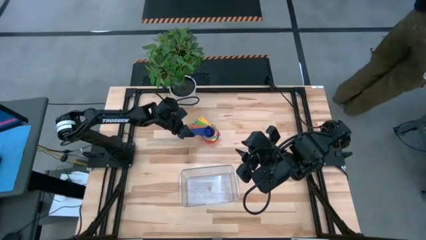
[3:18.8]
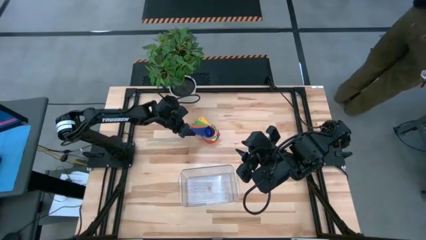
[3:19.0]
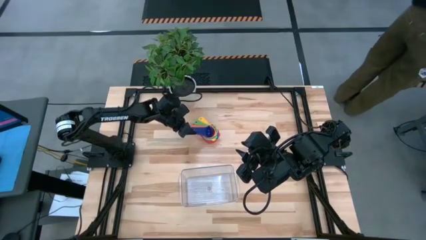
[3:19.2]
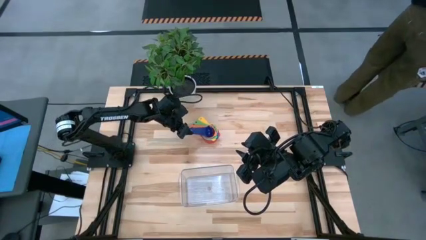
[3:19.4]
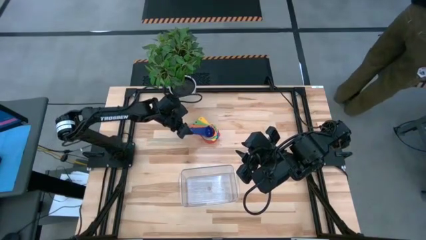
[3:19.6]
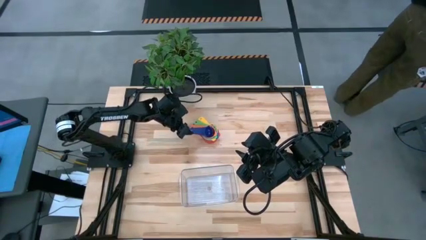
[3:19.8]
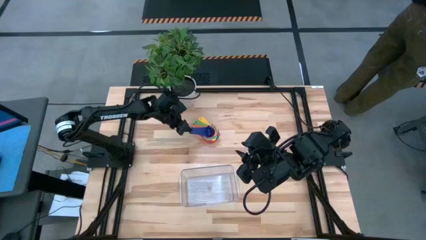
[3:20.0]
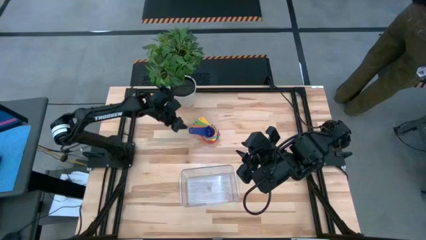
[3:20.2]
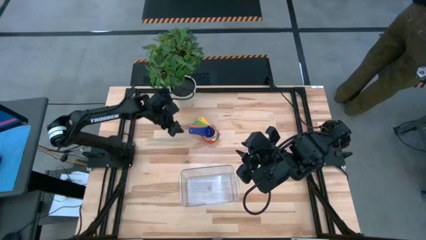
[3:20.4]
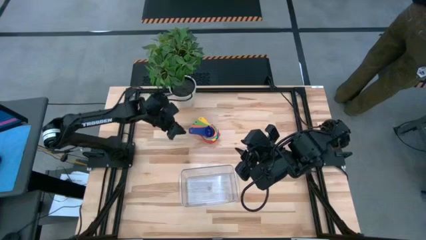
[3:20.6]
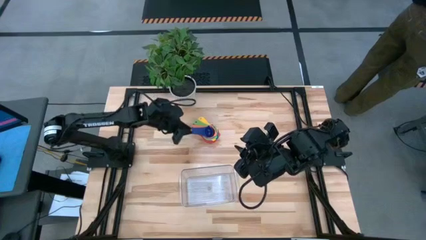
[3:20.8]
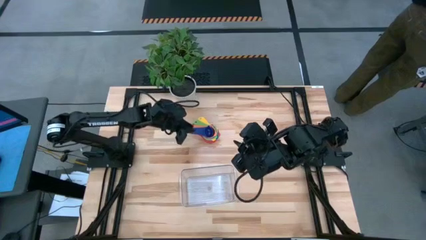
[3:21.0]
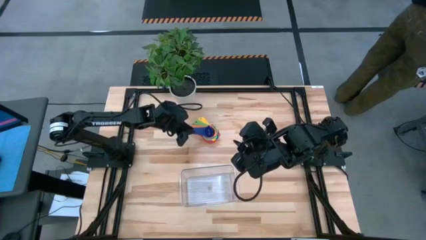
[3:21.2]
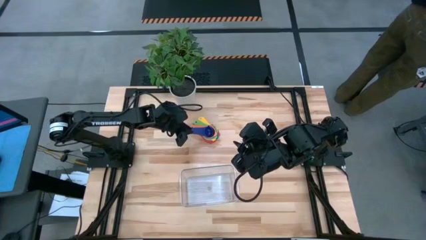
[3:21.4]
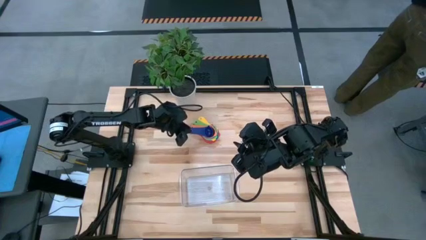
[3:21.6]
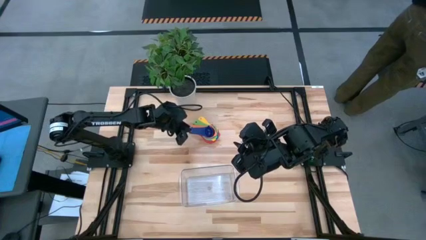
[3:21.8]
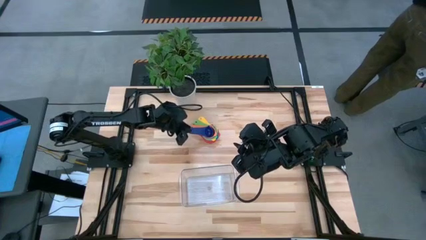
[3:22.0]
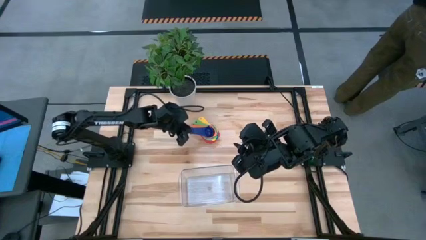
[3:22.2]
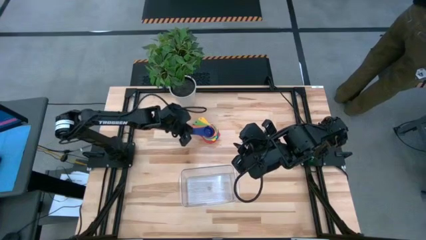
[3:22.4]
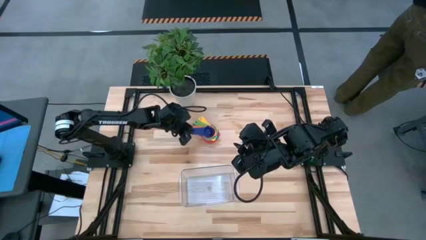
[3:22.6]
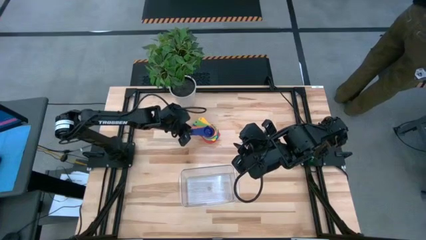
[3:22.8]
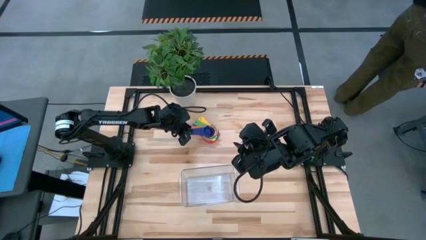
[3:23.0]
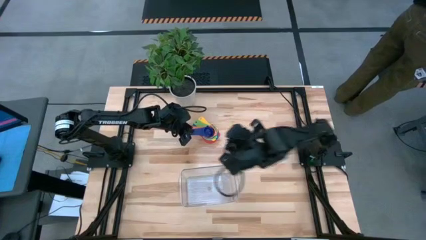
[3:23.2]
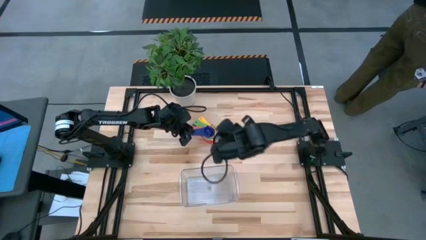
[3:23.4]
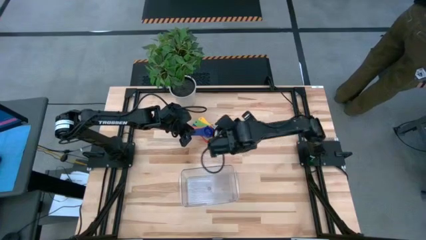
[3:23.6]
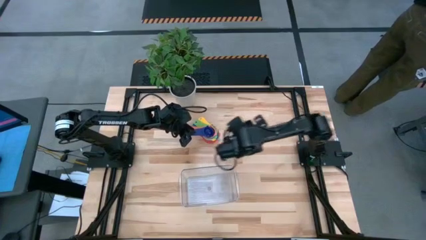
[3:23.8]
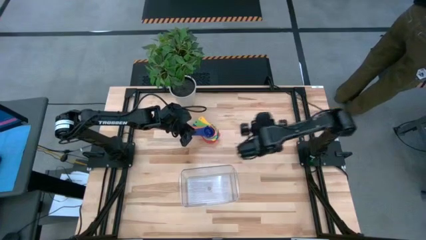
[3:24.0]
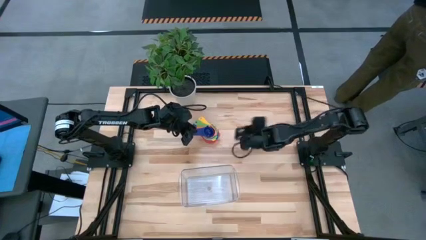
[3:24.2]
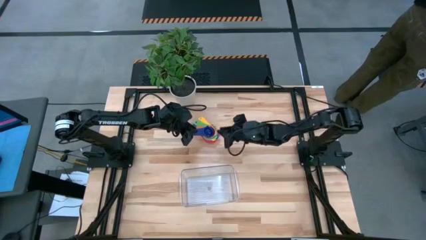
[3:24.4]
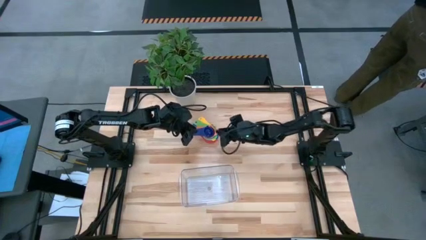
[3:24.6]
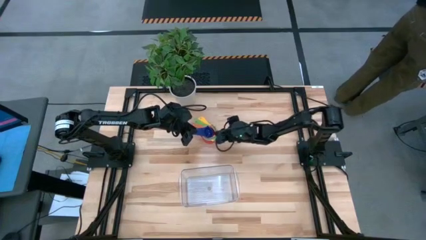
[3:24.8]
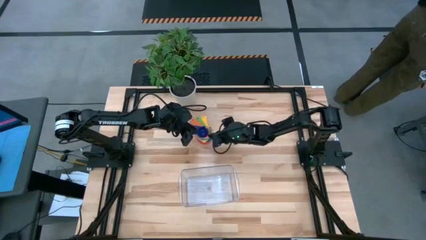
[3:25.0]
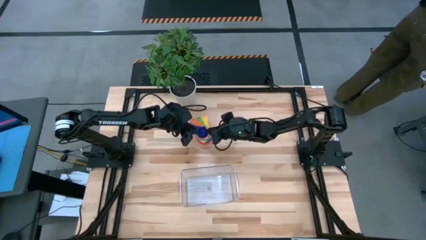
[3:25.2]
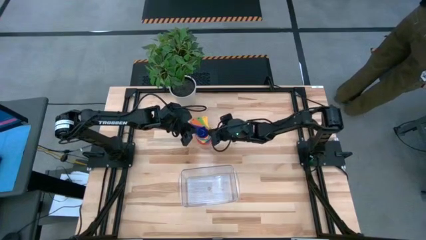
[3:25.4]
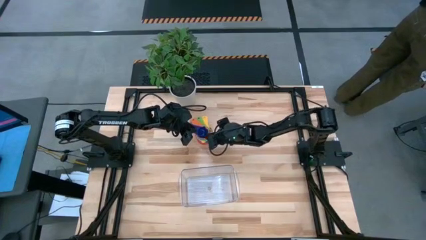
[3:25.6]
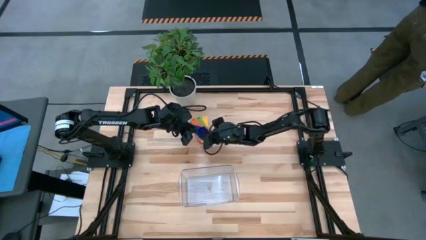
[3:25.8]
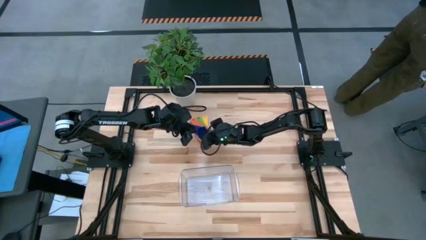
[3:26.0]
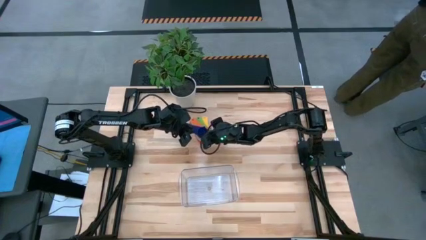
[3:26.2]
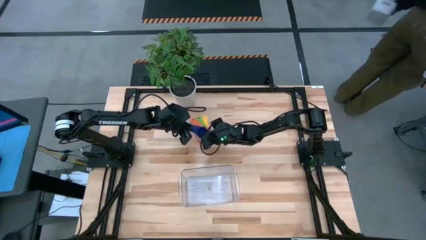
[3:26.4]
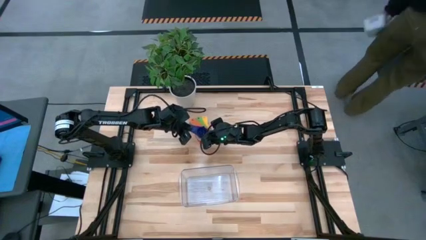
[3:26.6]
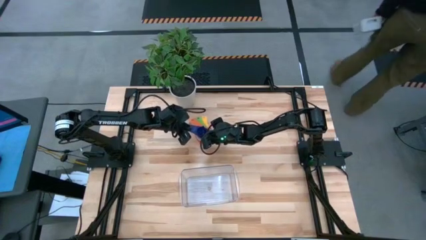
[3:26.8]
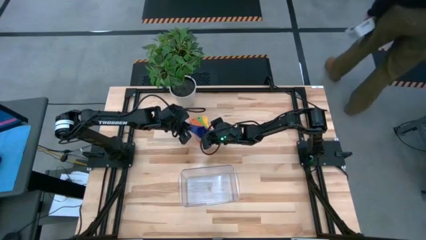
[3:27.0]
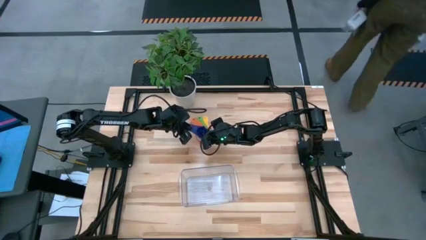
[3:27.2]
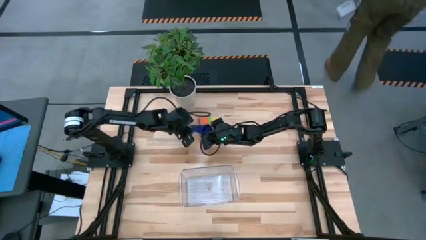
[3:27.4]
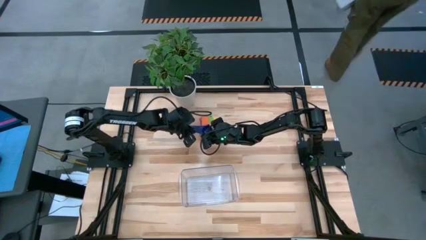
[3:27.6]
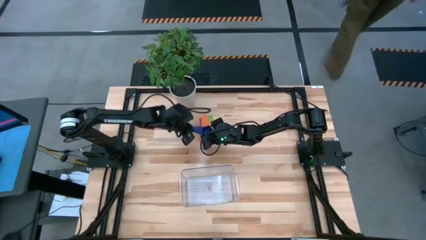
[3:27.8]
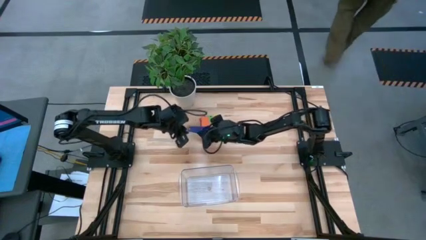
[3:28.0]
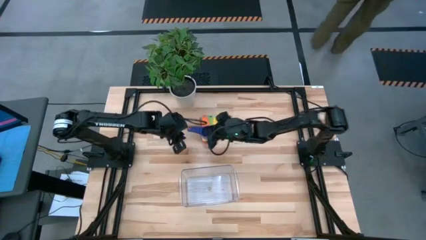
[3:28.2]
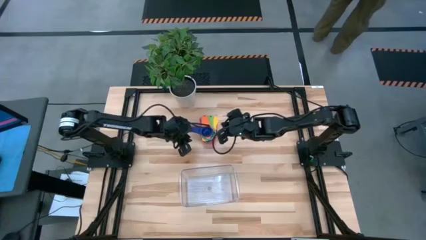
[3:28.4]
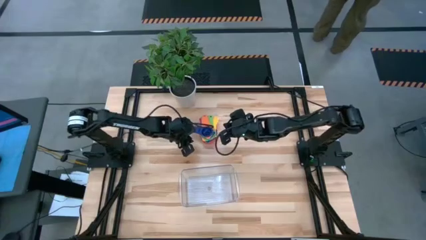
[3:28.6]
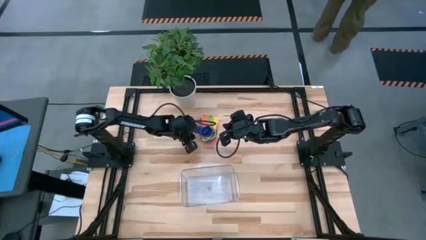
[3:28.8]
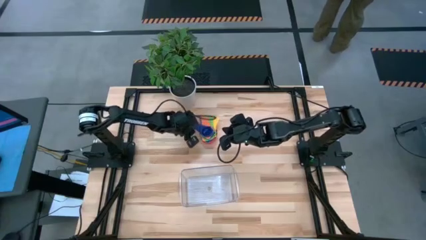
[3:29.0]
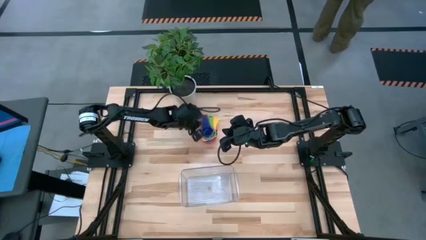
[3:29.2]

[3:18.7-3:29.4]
Task: Nest measuring cups in basket
Stack the dark blue measuring cups on top of the orange measuring cups

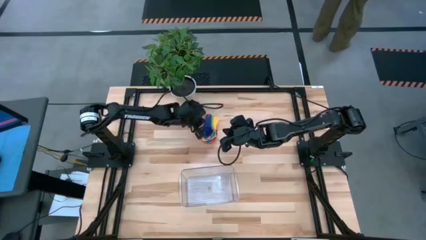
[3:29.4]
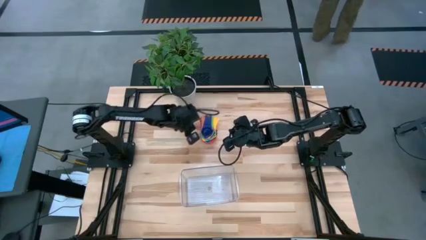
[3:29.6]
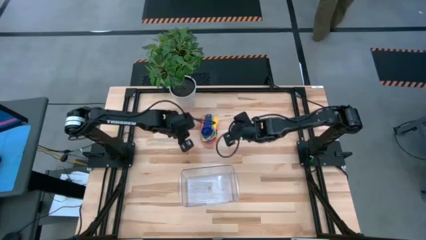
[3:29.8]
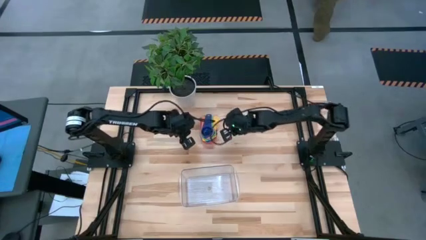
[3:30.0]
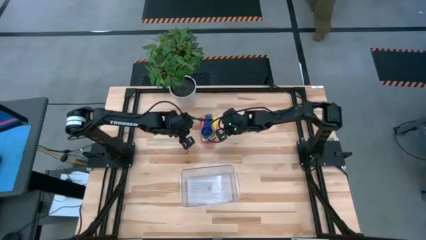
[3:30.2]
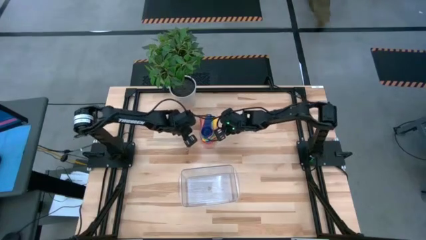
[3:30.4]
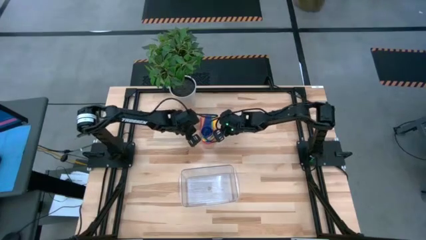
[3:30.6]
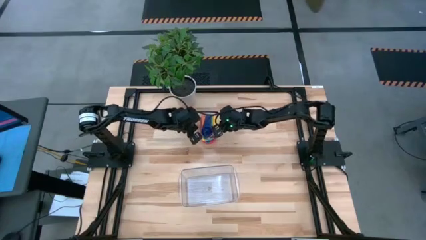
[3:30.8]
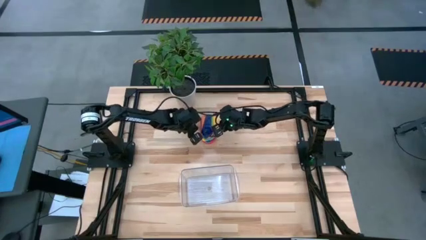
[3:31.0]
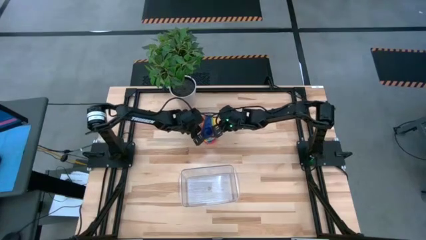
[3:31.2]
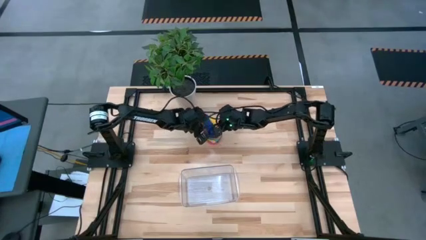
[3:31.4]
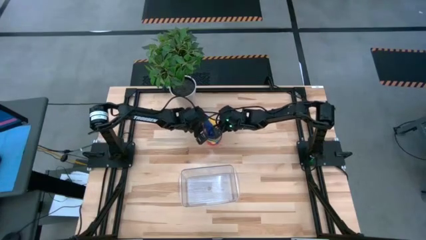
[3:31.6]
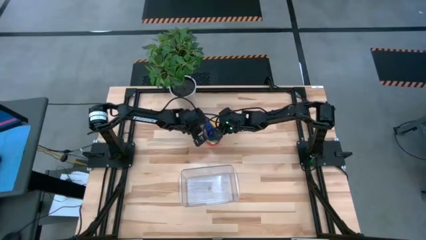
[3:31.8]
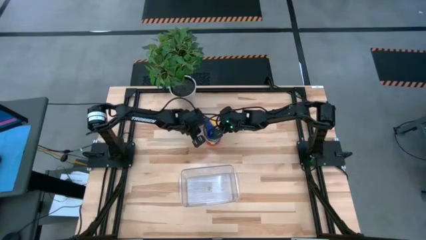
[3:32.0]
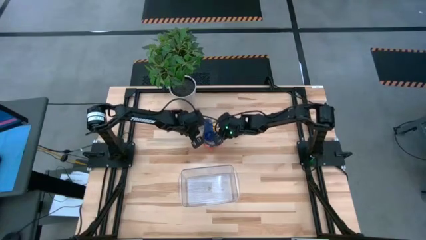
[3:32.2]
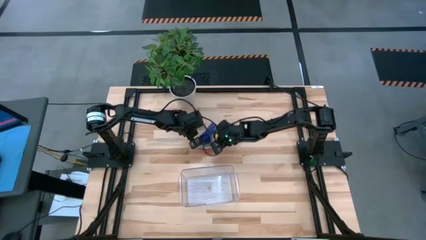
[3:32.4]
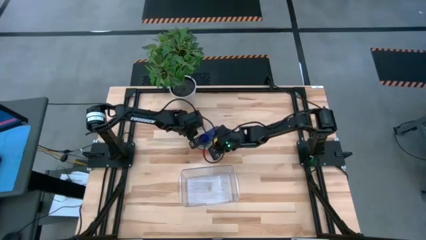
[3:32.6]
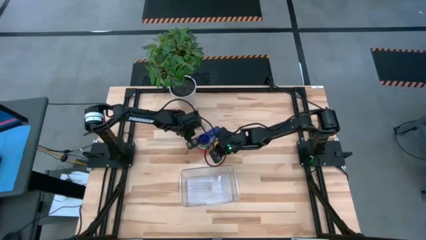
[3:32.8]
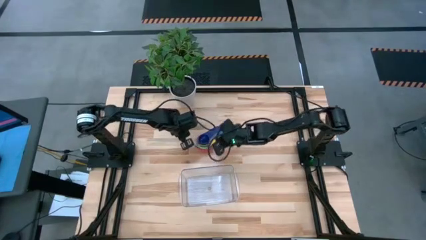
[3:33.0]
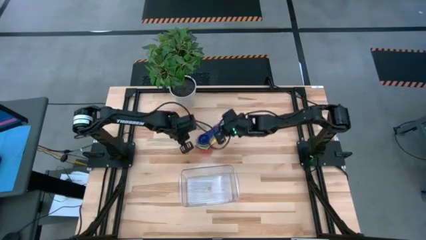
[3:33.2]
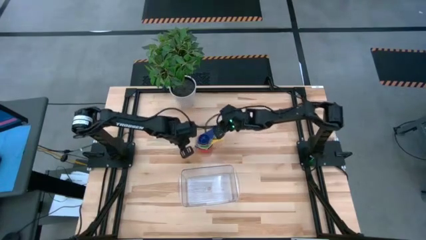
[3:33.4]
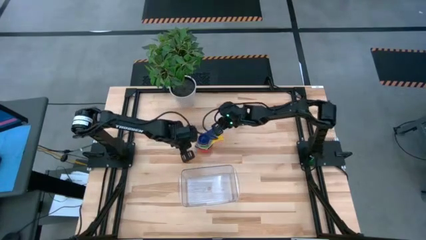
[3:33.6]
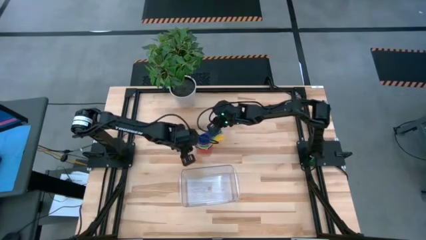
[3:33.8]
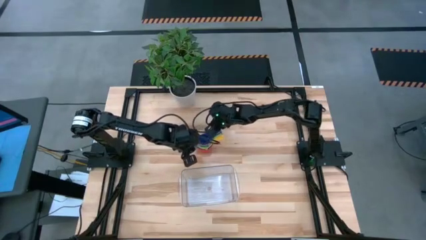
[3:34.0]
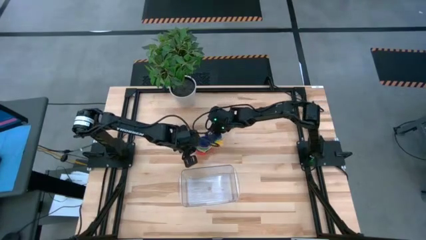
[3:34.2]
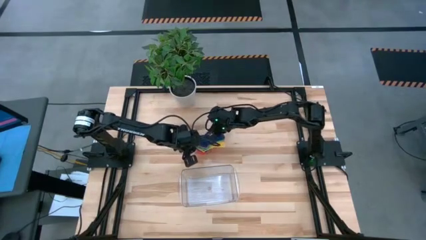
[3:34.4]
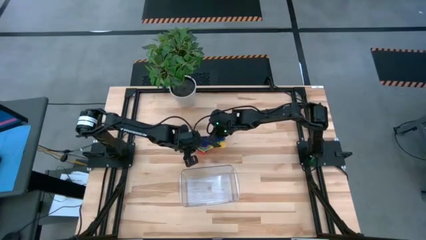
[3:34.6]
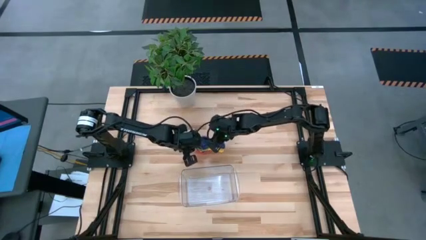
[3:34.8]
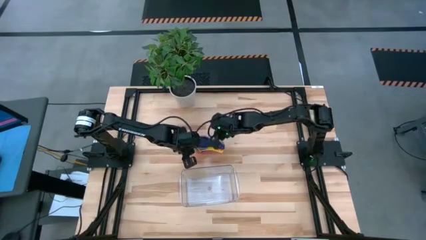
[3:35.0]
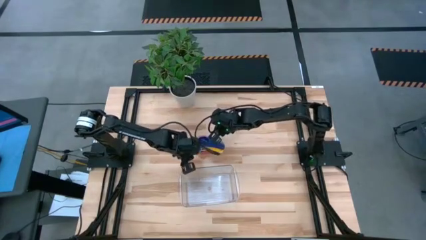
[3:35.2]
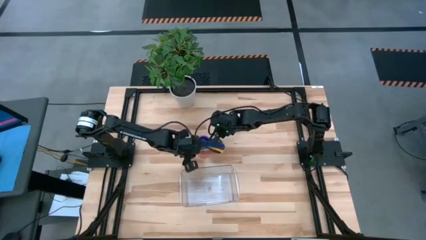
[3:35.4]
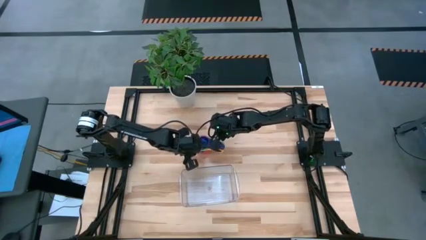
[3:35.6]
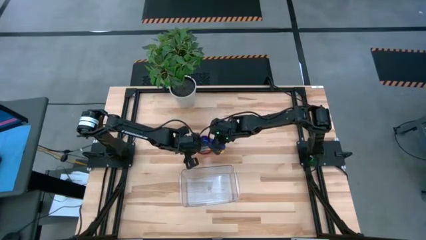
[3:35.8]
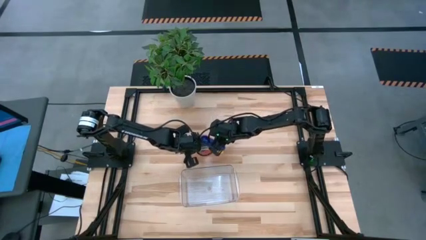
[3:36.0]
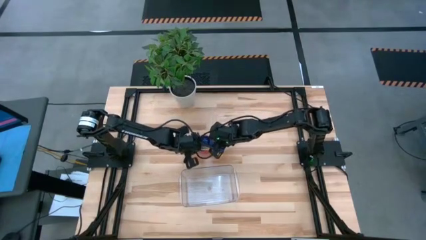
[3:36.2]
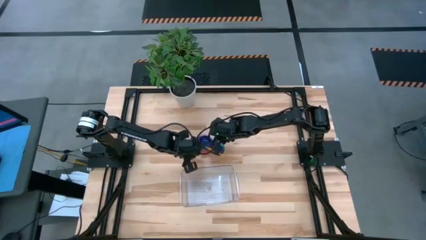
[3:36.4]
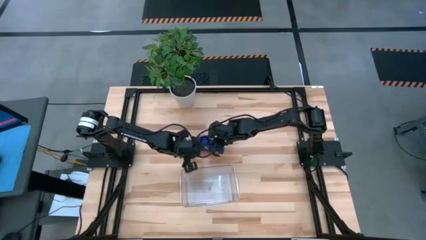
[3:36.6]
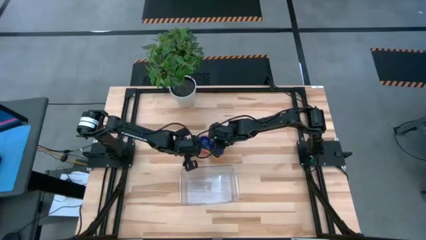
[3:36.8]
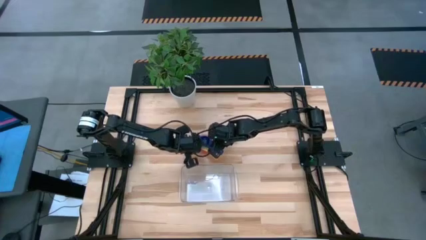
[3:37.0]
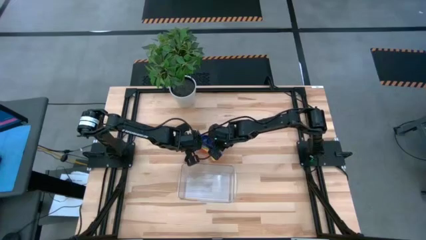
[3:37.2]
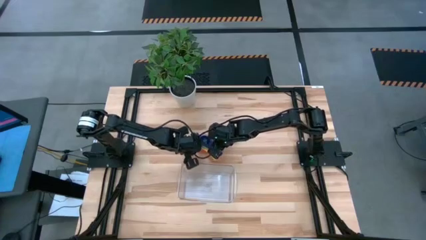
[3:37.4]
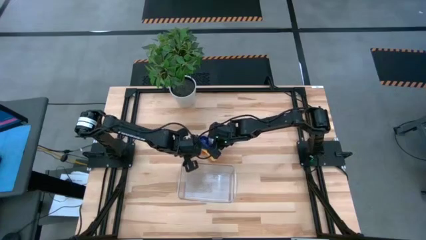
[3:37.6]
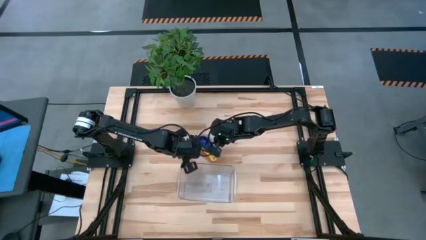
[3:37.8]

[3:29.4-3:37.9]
Adjust the colored stacked measuring cups
